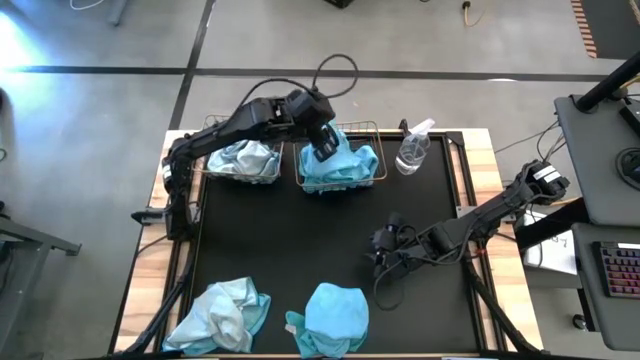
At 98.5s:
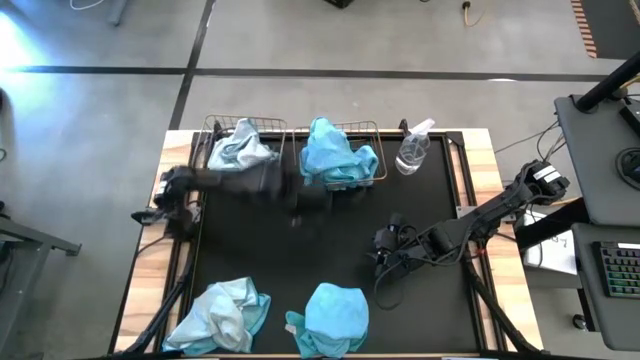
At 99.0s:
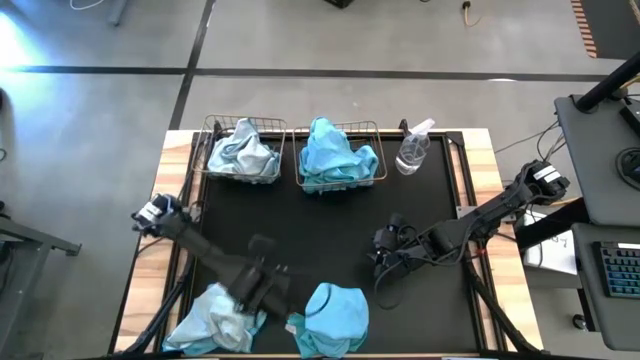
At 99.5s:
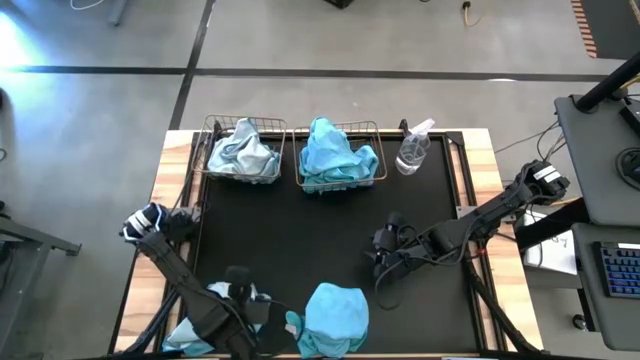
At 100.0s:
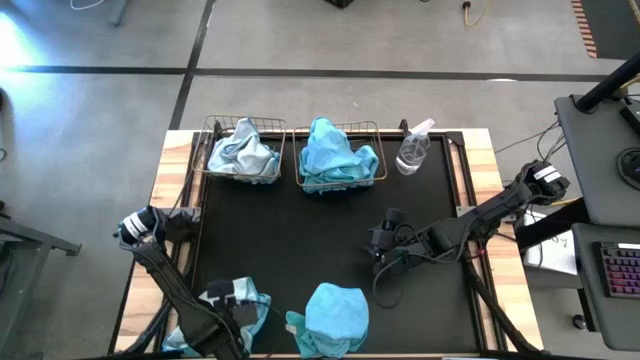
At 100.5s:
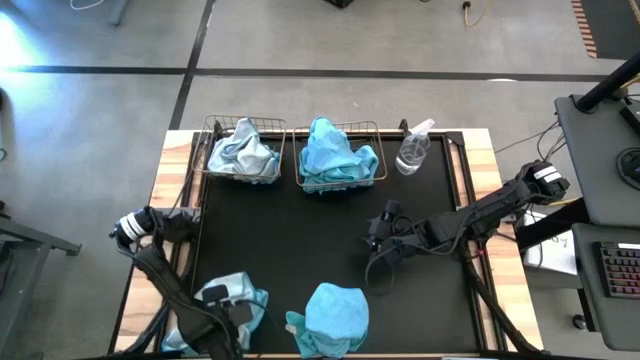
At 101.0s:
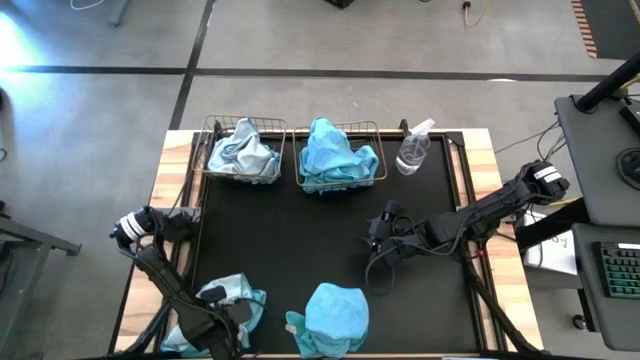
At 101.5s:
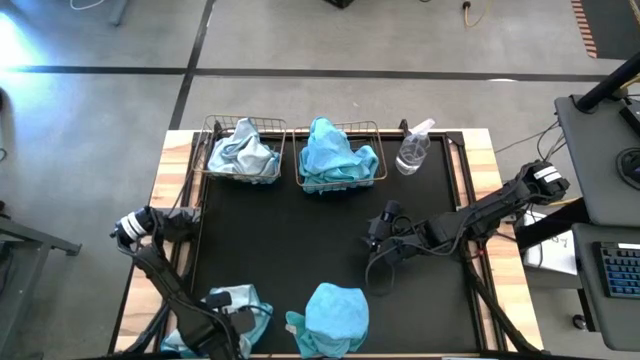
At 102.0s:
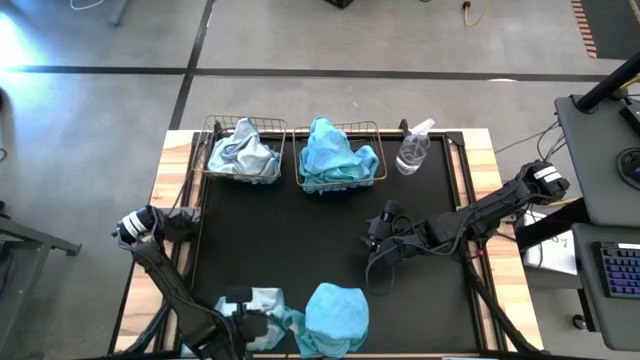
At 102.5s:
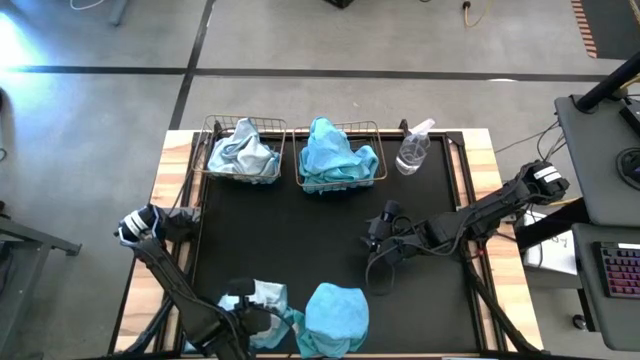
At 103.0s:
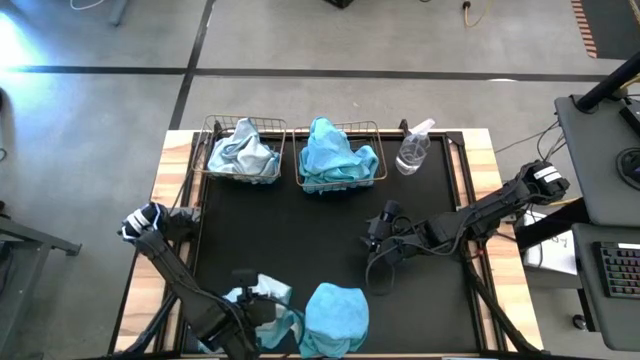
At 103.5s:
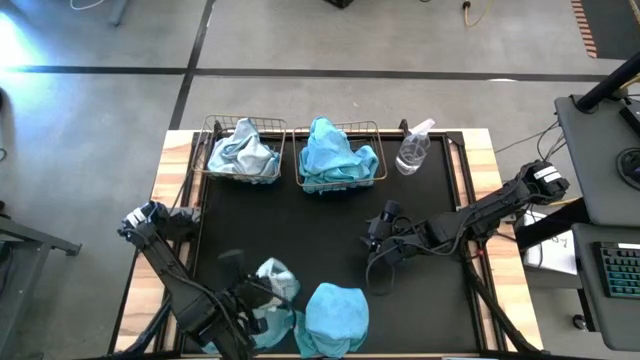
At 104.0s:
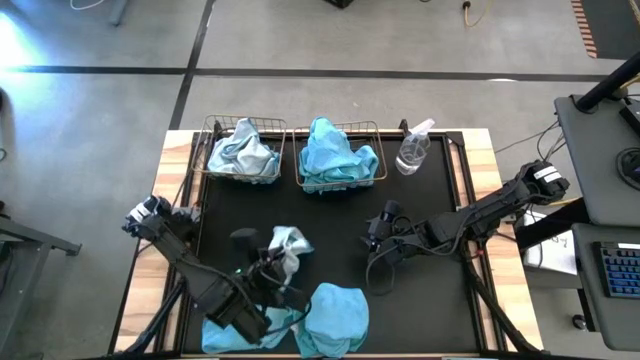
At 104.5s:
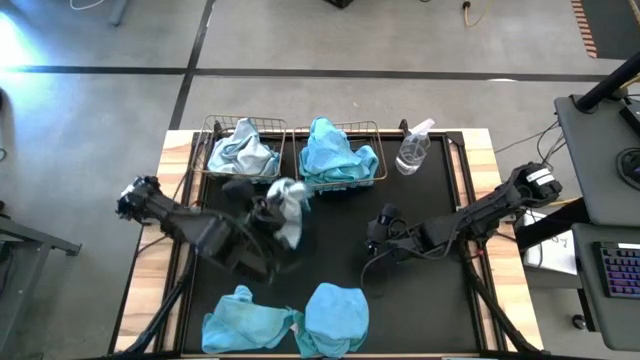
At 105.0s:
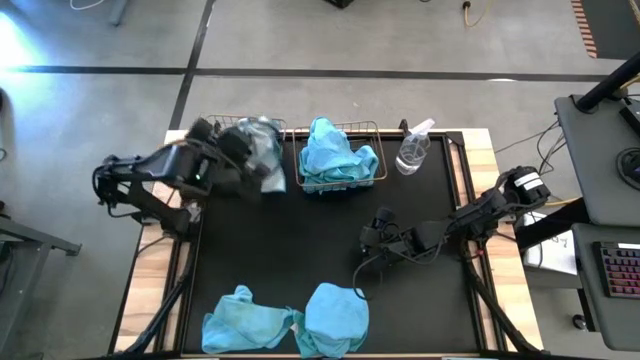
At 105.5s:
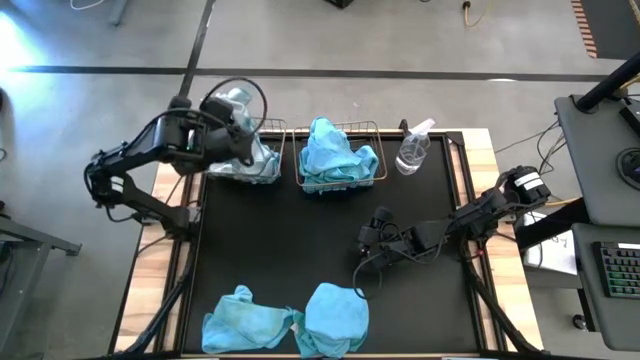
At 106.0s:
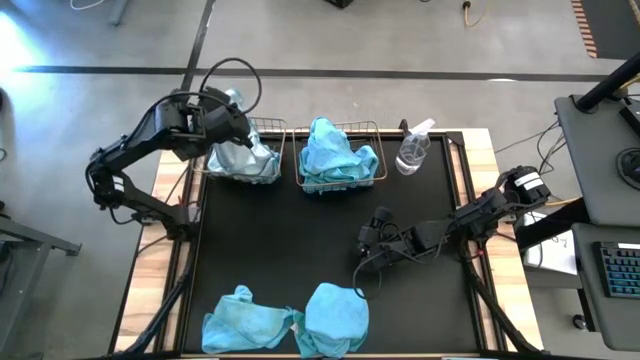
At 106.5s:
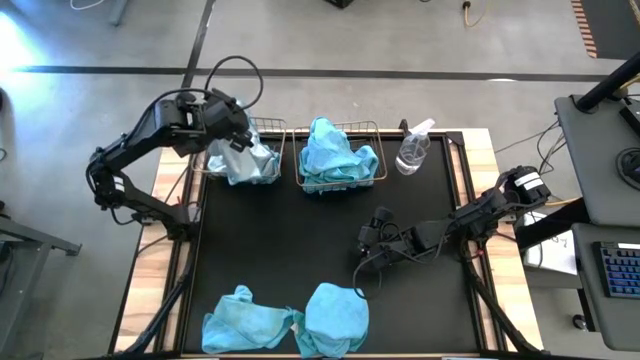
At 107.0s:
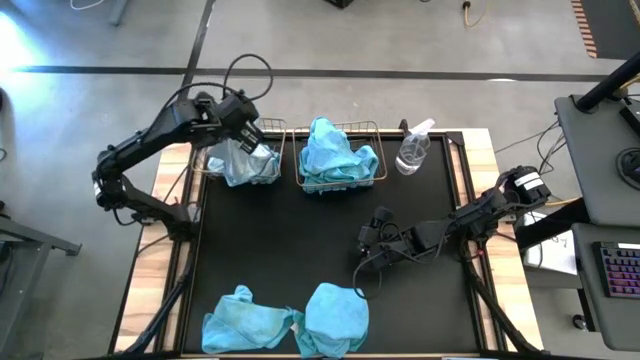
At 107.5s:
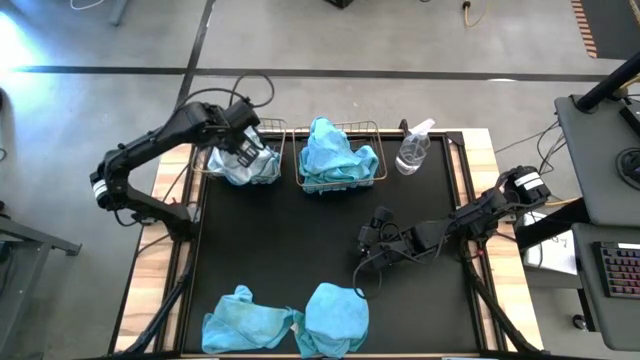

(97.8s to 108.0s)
Task: Sort microfiber towel by color & place in baskets
Put the light-blue microfiber towel into the left wire basket

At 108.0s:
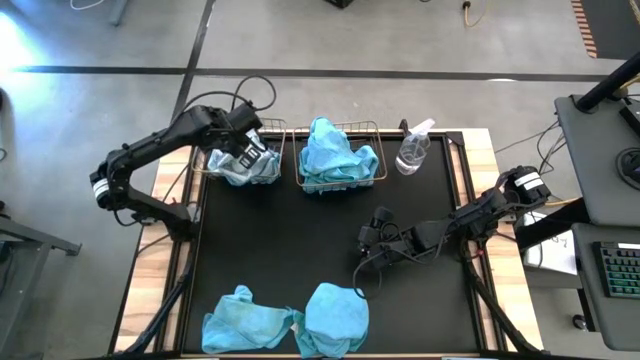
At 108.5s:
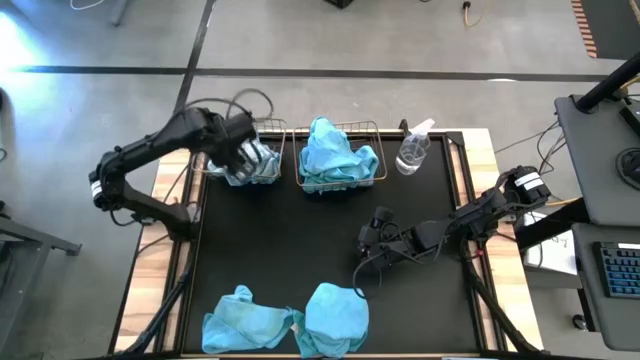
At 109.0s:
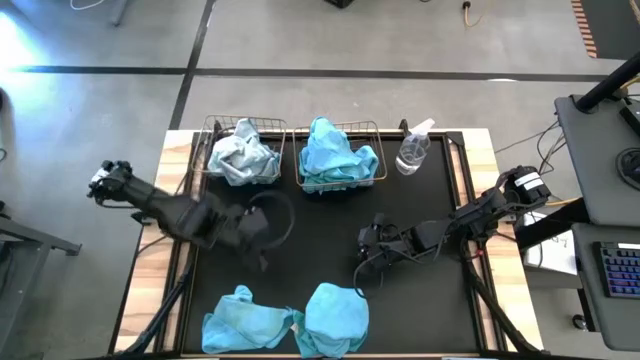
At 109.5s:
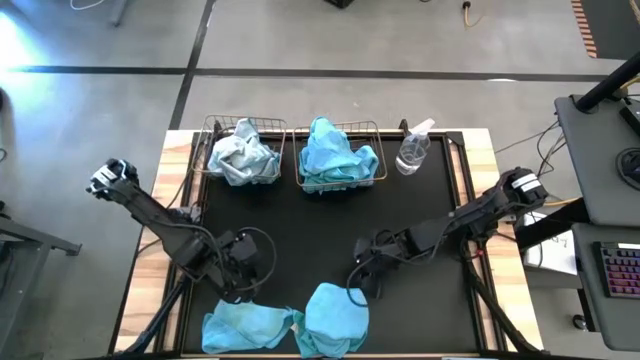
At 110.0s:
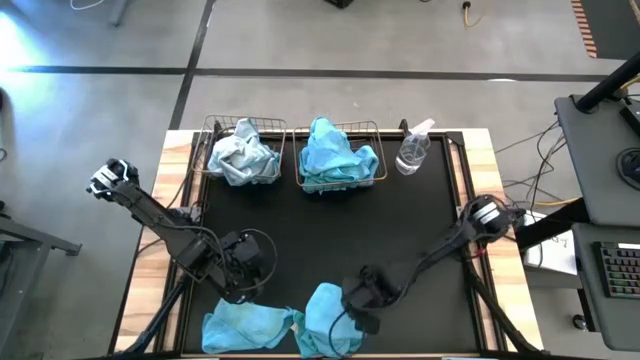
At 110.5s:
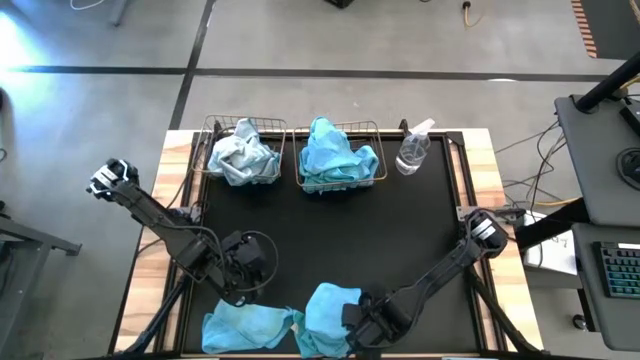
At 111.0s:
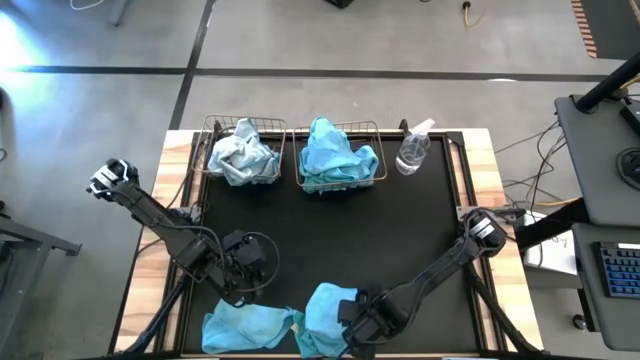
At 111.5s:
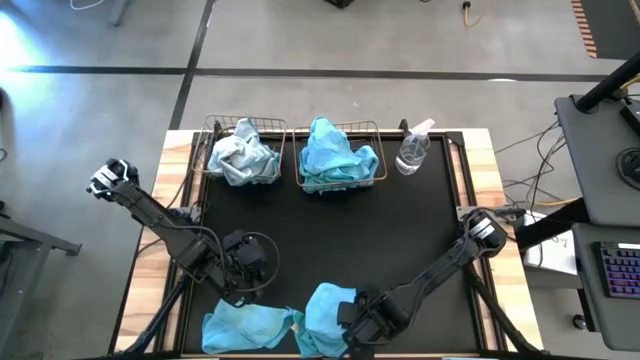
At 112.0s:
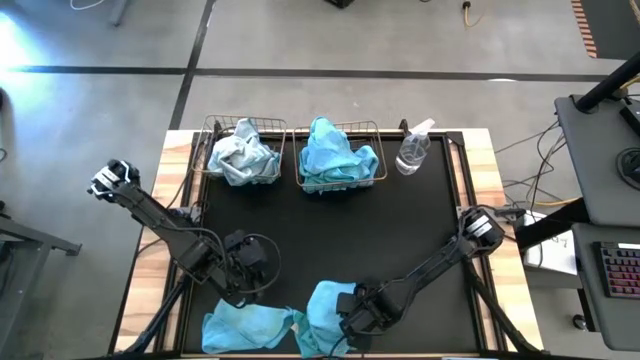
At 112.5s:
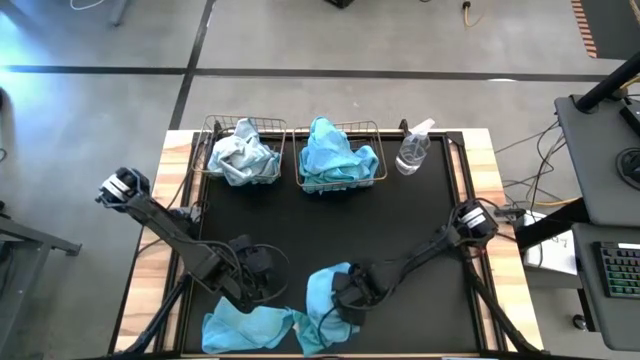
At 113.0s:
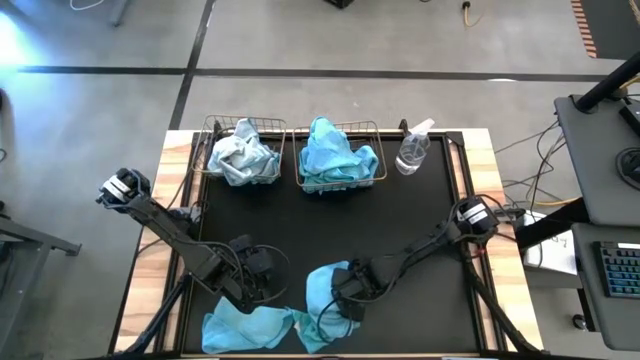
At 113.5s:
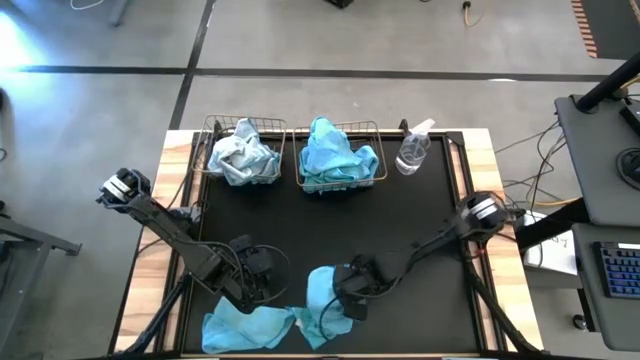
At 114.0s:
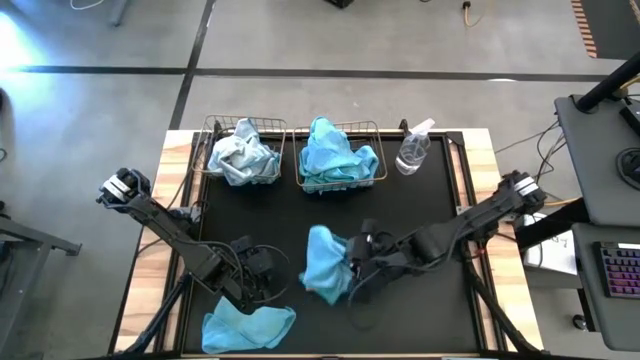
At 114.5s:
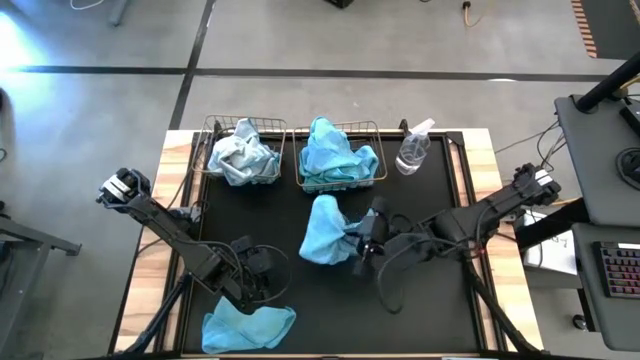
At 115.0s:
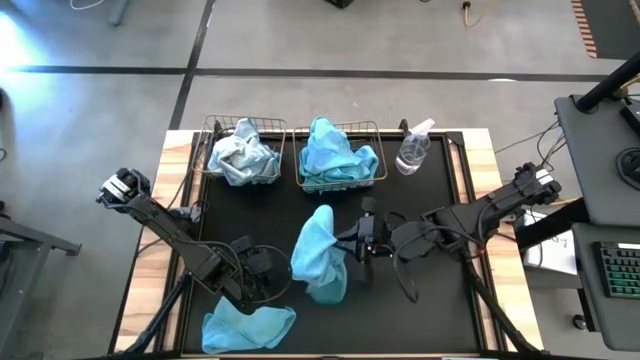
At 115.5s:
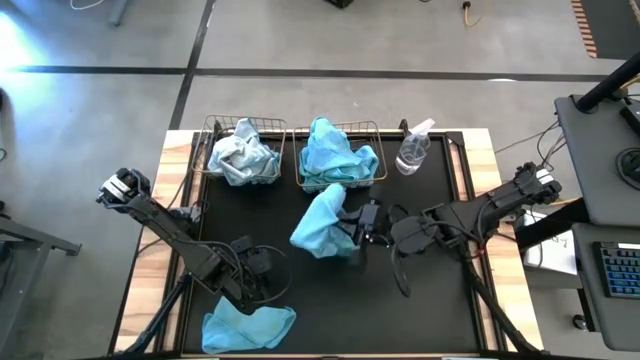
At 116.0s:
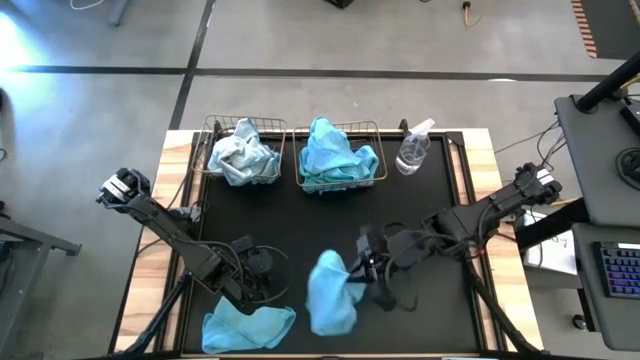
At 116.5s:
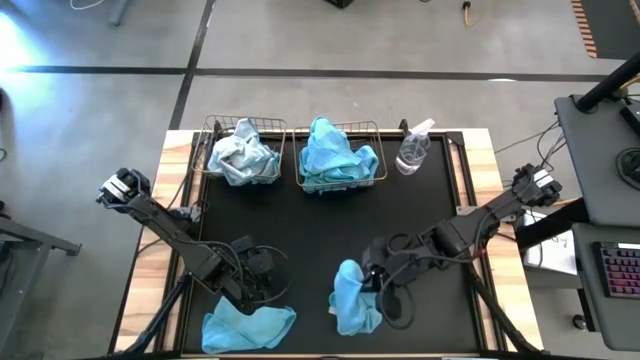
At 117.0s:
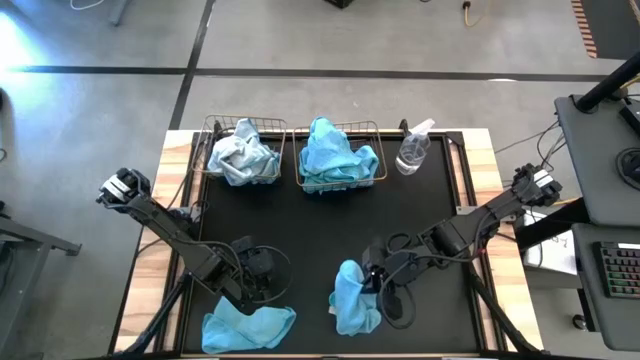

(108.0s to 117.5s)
Put the blue microfiber towel into the right wire basket

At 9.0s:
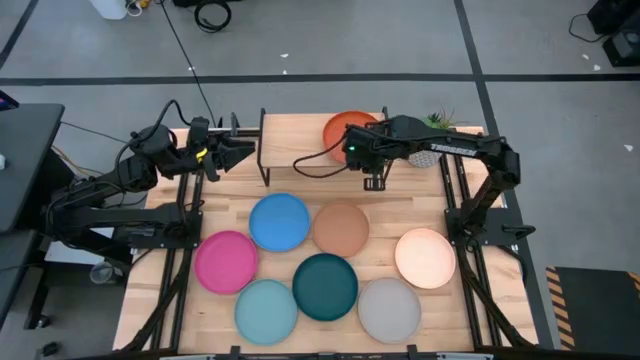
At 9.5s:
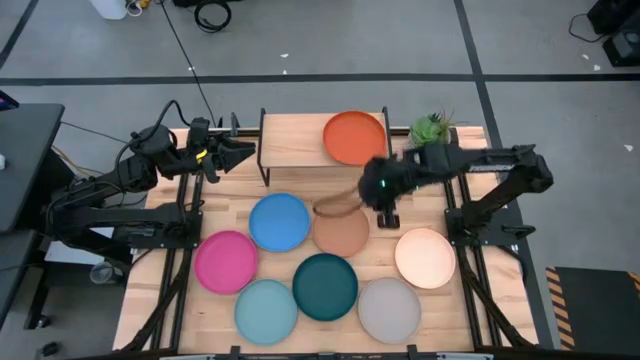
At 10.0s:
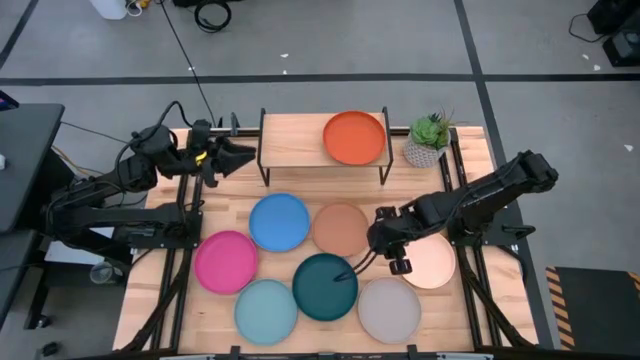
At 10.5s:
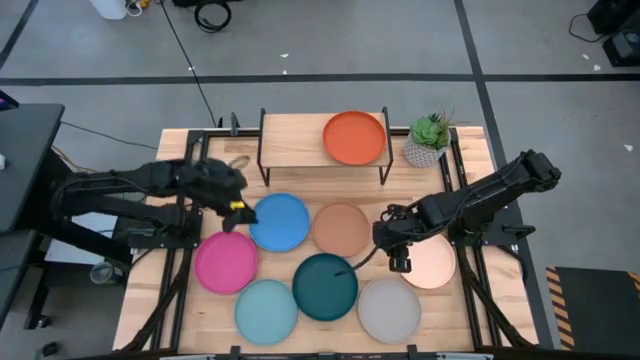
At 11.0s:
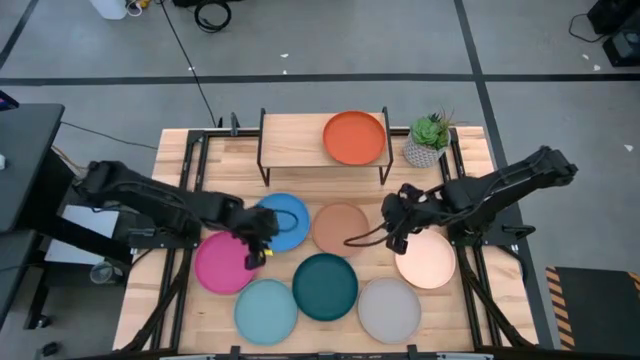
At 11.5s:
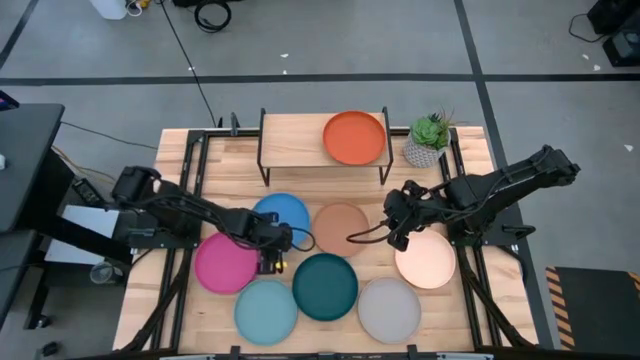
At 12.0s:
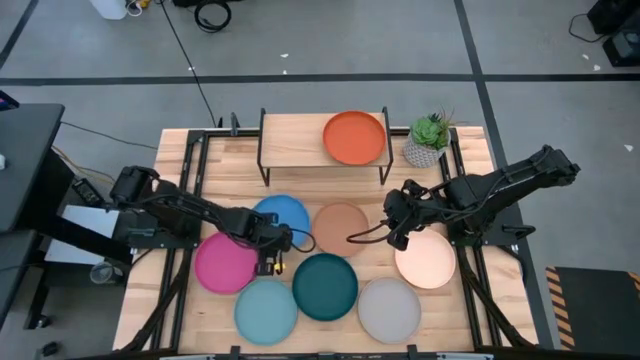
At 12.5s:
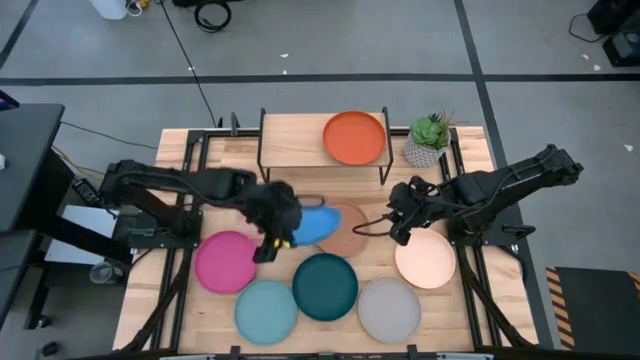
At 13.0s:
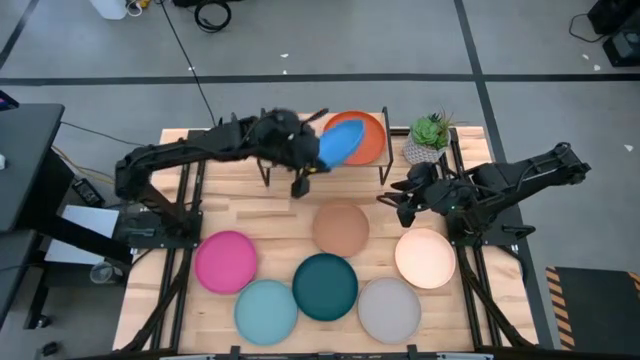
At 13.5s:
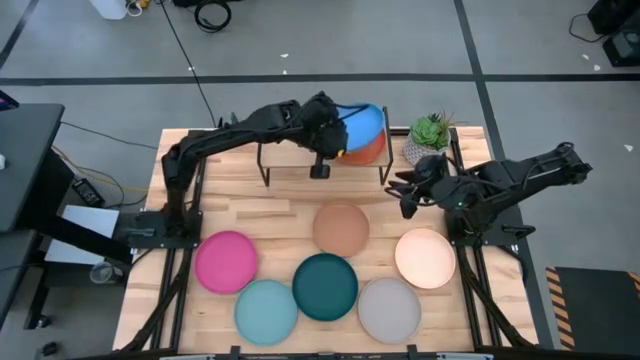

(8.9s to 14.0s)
Task: Place and stack plates onto a shelf
Stack the blue plate on top of the orange plate on the shelf
